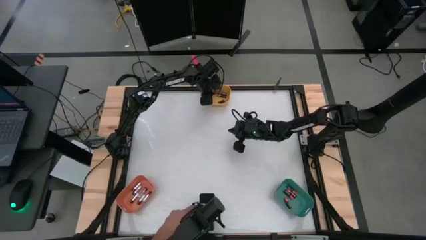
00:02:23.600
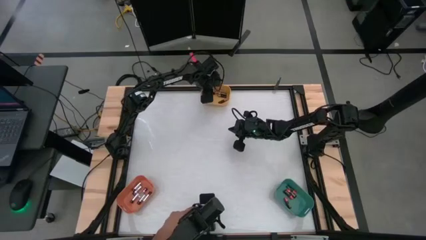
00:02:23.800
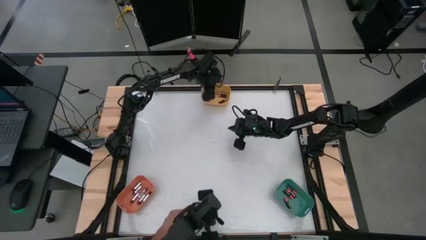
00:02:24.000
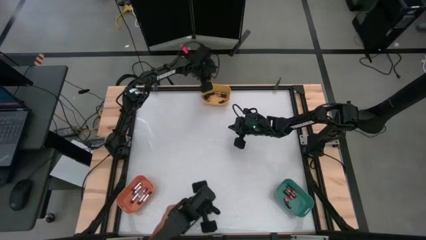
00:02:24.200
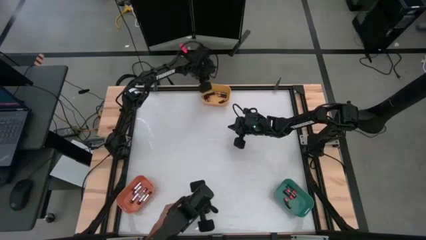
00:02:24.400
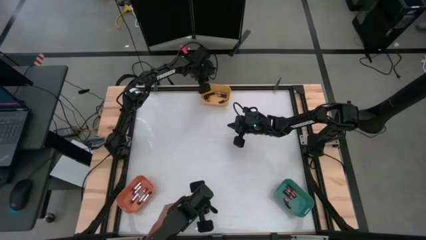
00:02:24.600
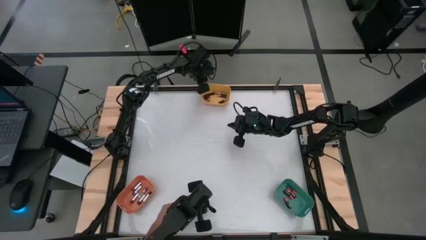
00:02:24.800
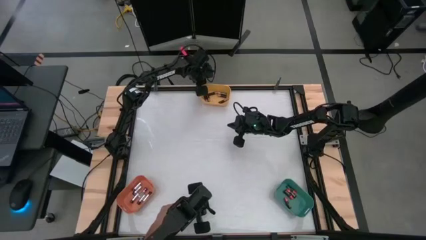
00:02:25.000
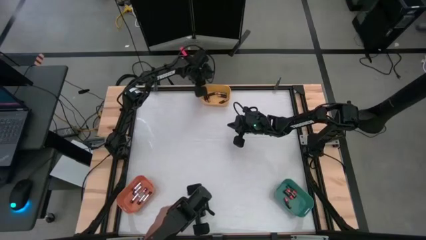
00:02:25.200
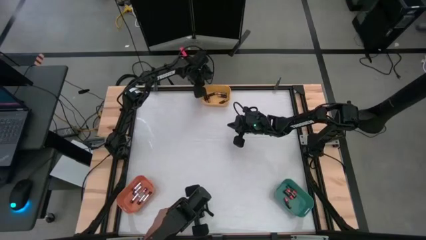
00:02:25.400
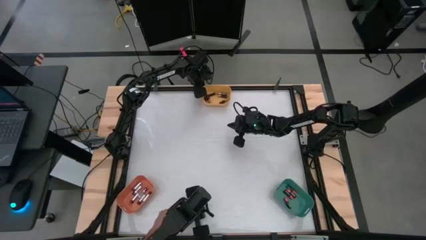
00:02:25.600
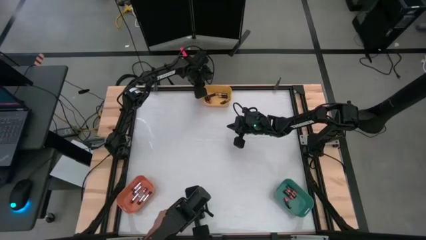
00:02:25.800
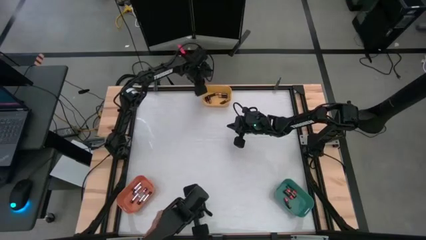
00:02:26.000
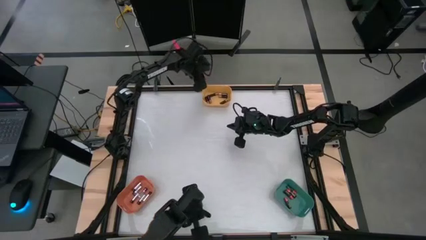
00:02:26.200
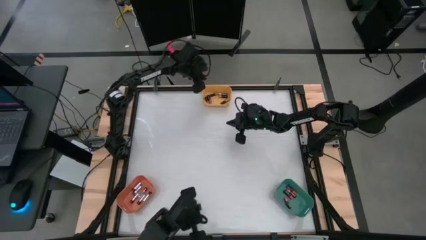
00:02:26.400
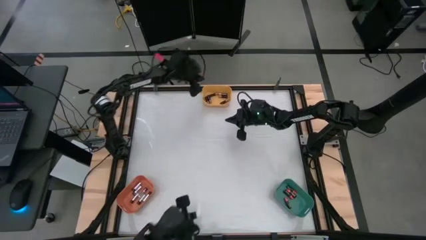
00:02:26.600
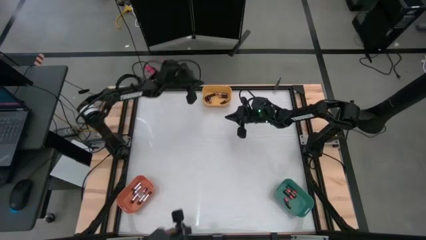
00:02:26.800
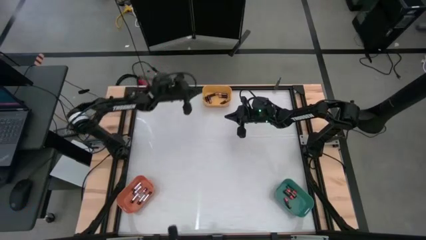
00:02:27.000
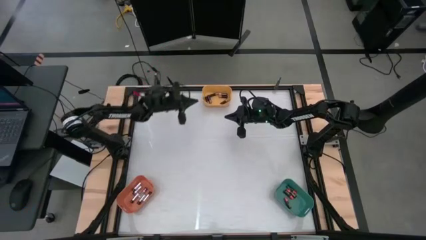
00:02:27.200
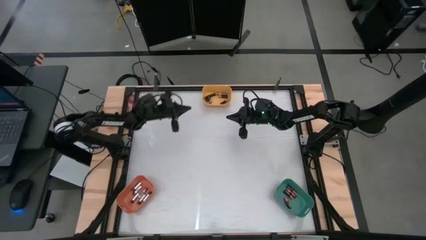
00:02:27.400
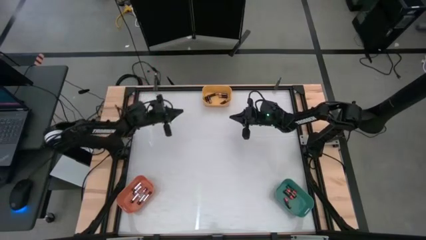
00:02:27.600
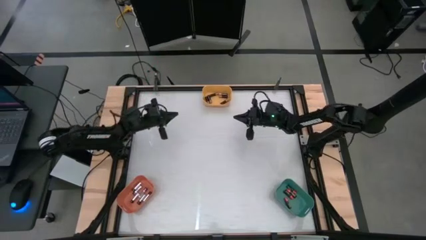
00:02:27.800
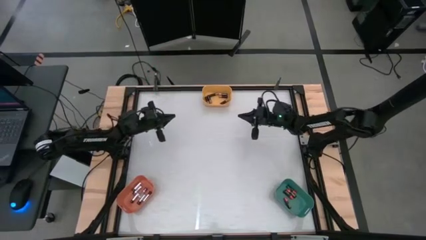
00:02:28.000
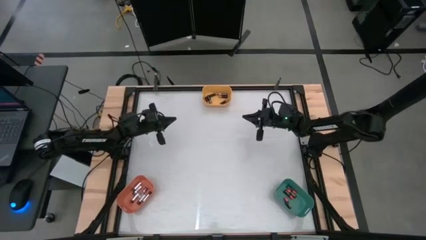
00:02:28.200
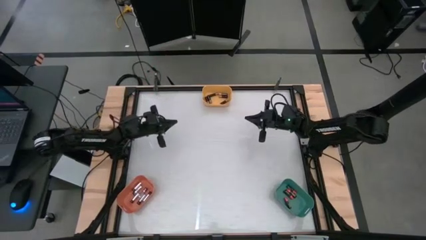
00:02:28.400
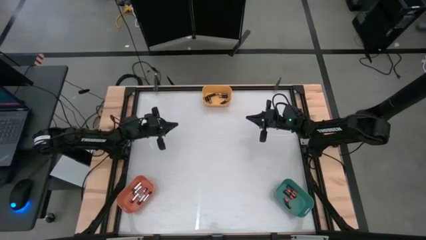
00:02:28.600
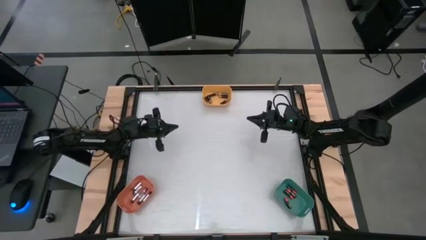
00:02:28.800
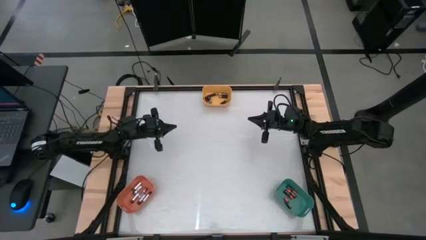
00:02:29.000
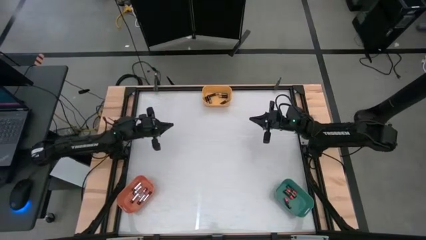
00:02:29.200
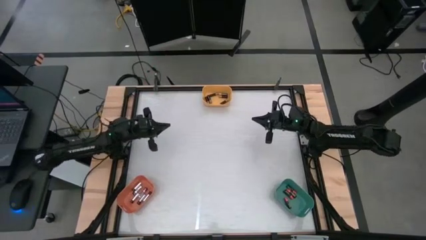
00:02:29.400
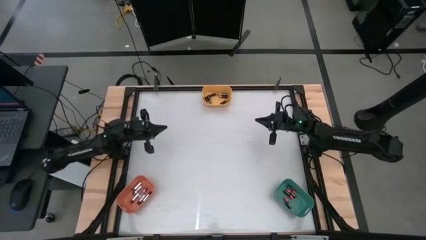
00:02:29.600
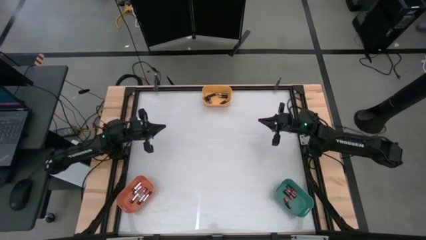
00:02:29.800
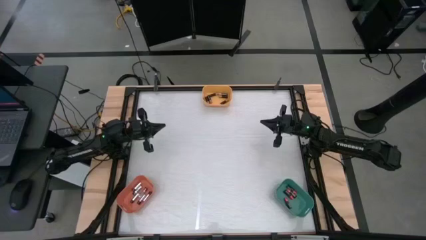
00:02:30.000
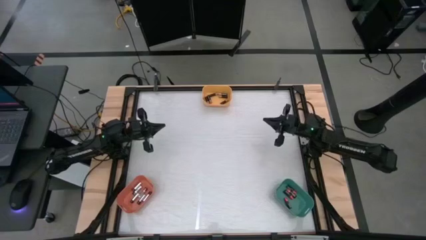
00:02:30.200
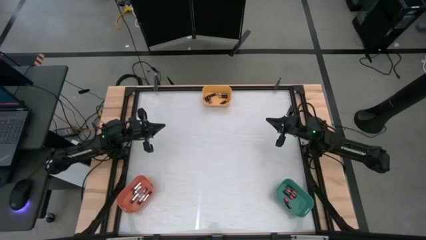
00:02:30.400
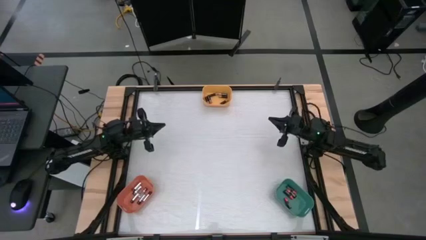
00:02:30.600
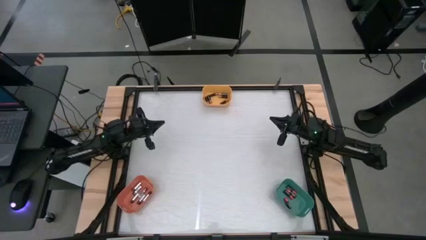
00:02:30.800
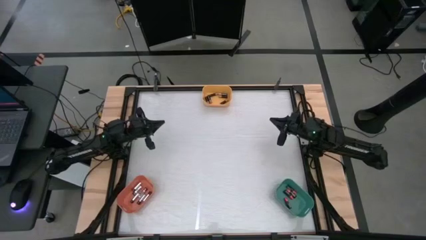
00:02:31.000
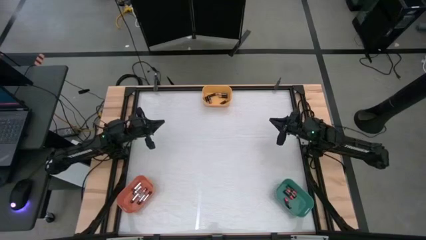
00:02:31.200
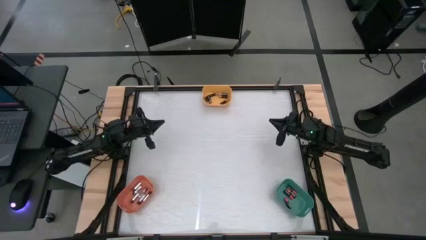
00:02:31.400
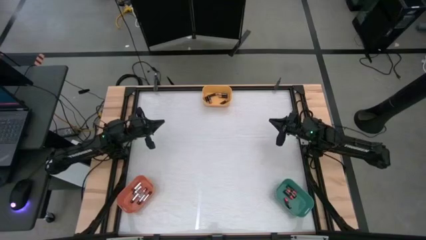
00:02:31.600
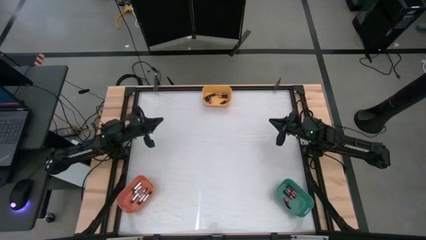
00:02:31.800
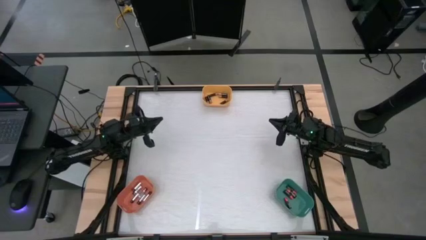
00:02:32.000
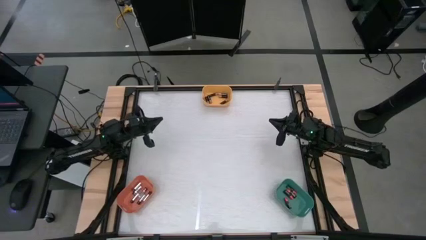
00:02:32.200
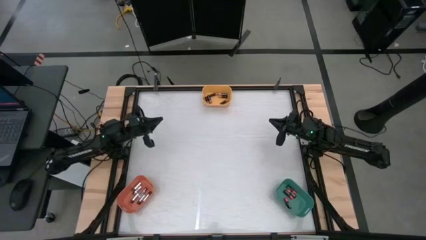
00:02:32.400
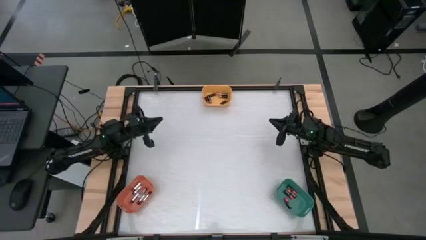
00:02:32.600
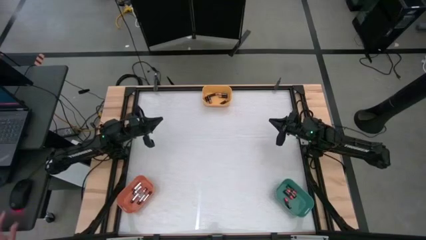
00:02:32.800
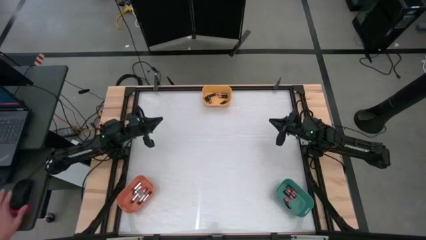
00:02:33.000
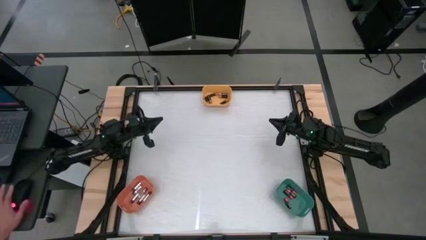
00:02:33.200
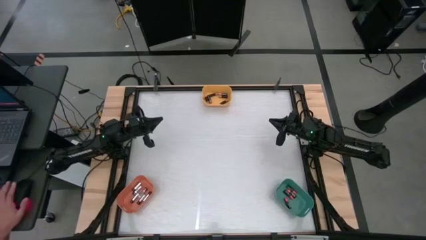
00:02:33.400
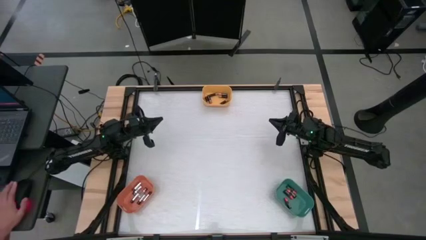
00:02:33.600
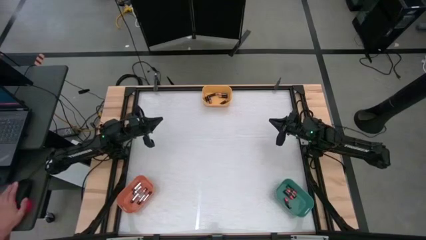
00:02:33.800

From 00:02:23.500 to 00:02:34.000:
Task: Sort batteries
Return To Home Position

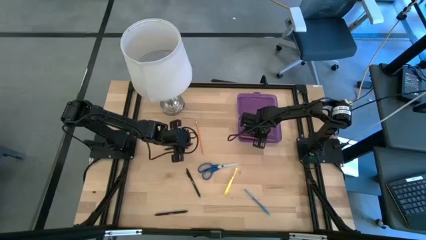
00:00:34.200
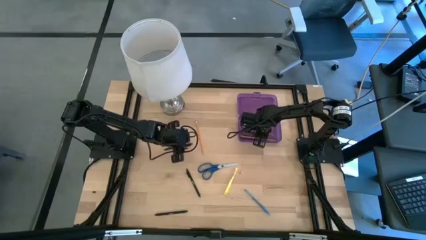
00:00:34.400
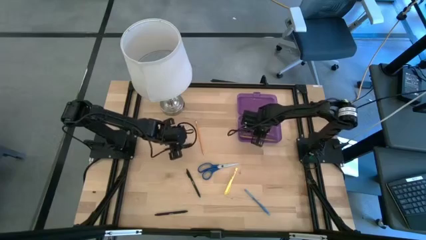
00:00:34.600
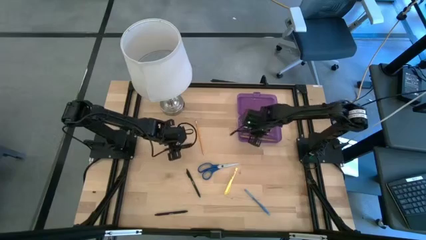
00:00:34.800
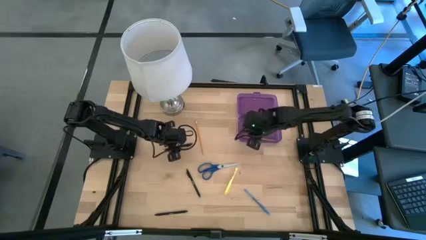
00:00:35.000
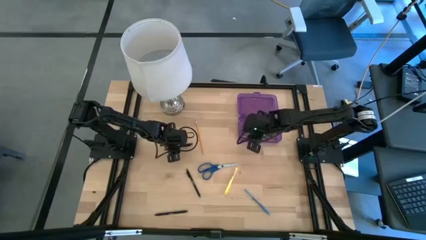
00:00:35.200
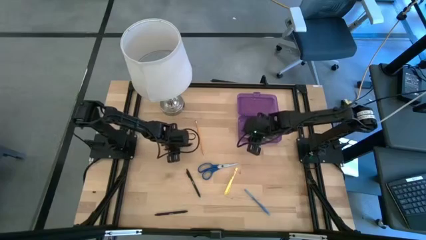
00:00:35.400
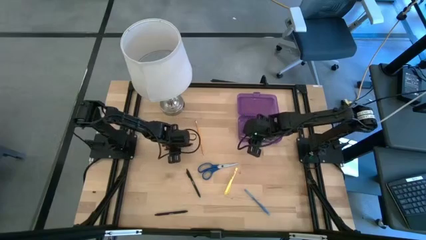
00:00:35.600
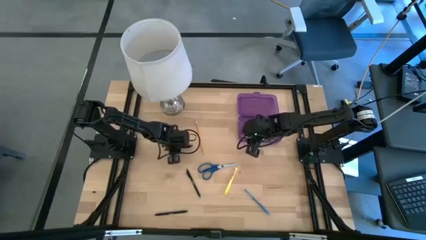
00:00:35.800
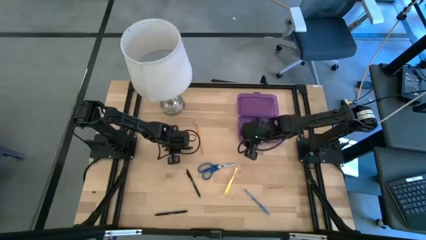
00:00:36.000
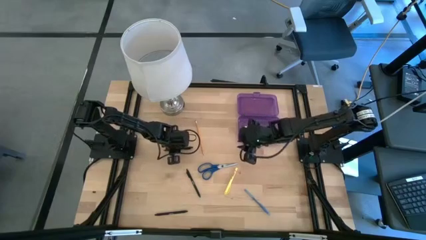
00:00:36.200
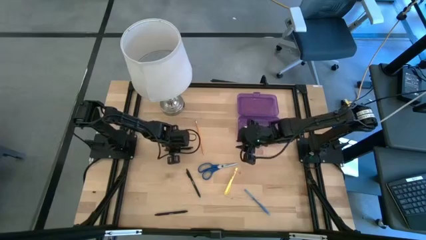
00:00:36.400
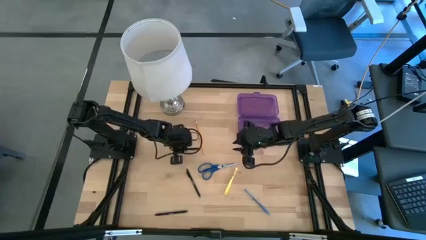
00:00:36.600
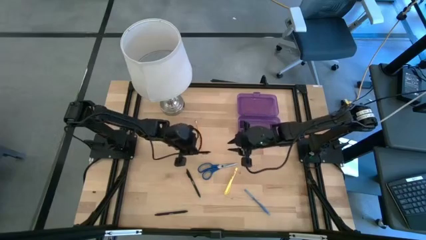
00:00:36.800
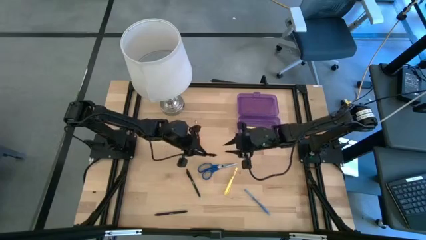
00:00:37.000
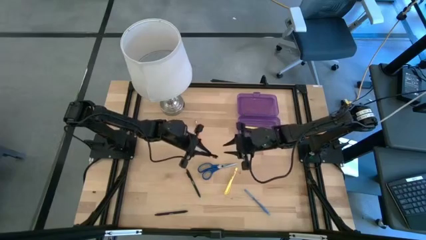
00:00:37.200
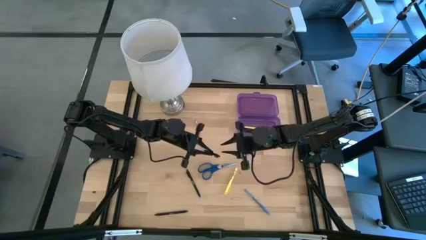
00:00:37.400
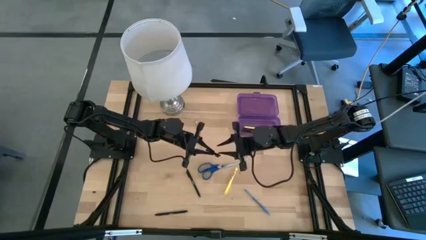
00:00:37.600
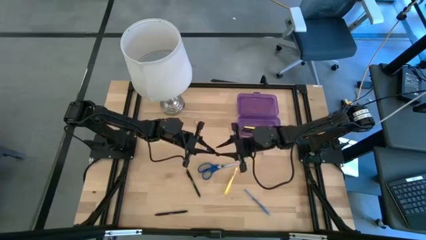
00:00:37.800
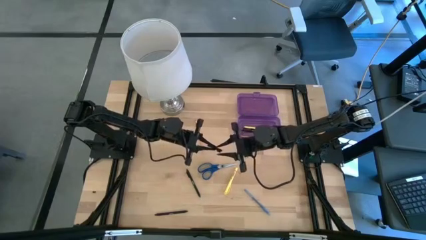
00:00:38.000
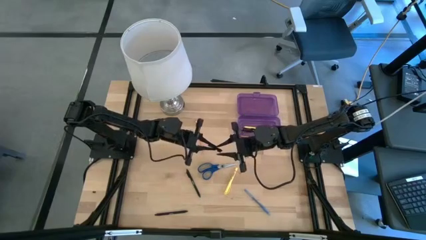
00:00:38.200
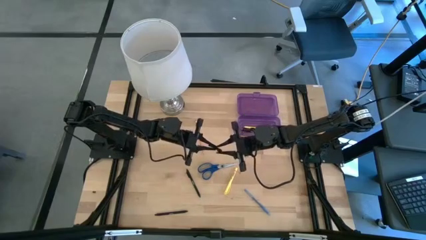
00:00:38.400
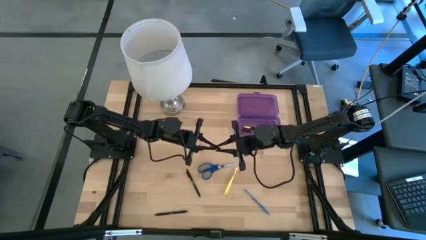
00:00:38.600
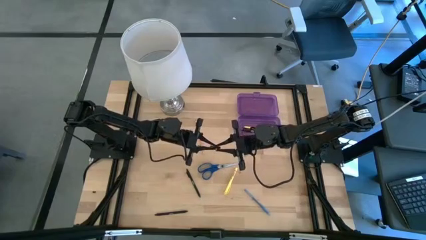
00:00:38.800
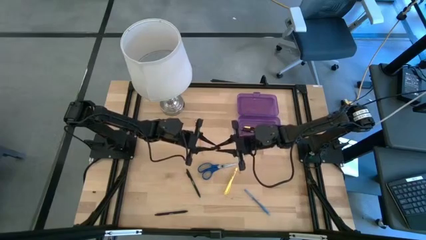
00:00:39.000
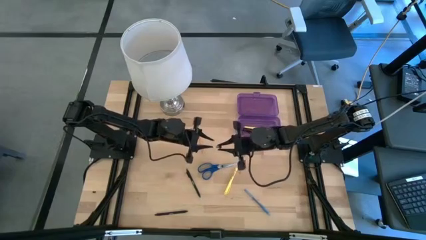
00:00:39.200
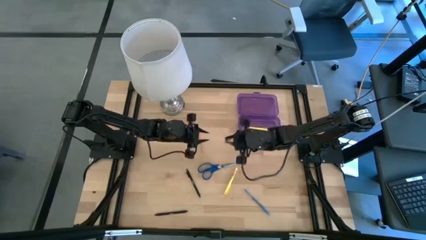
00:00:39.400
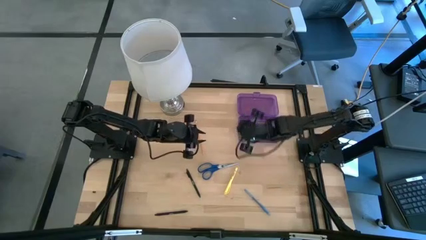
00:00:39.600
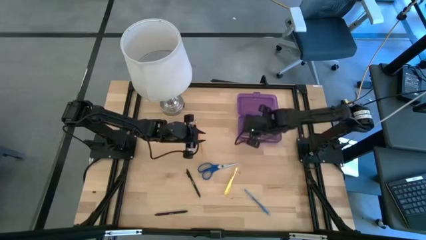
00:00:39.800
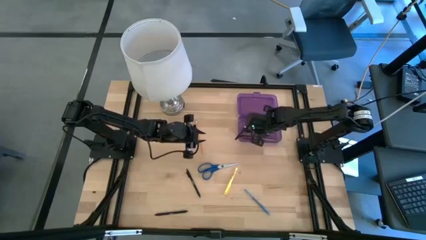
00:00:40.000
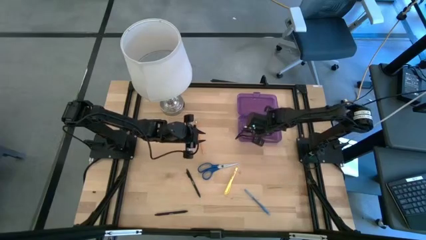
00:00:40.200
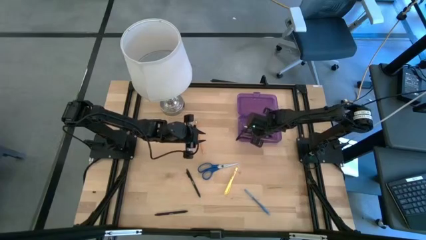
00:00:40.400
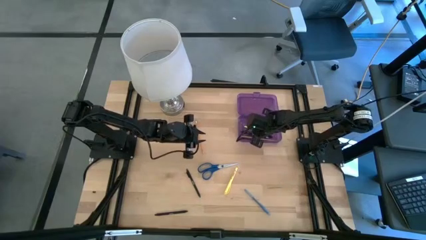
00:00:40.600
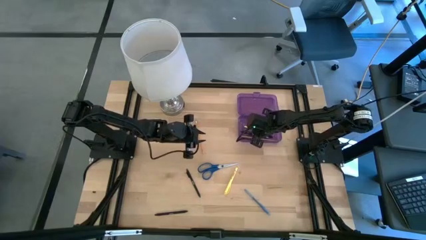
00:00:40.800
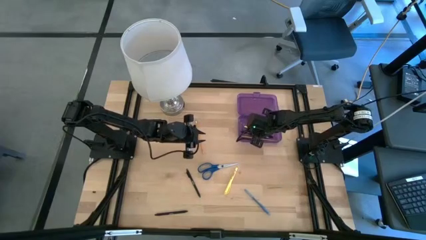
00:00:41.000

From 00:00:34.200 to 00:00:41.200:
Task: Pick & place school supplies into a supply box
Put the top black pen into the purple supply box
